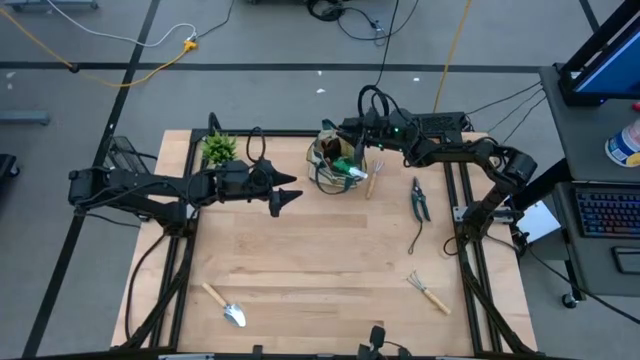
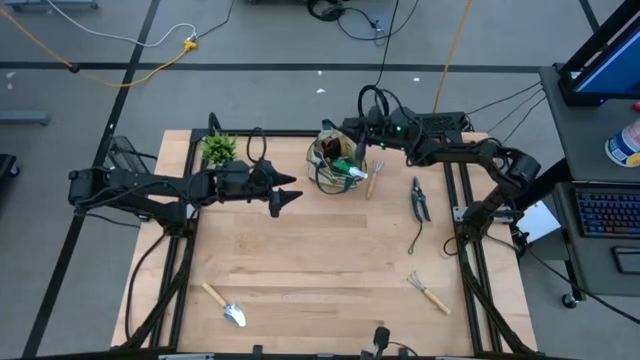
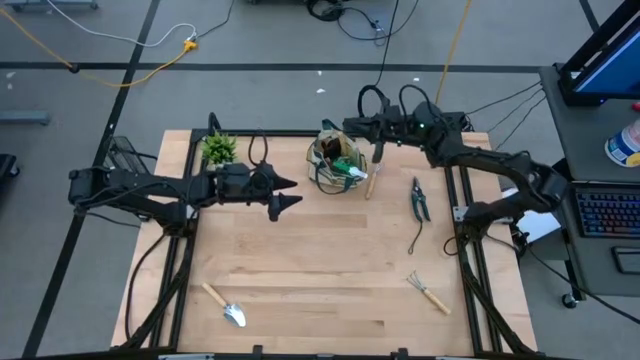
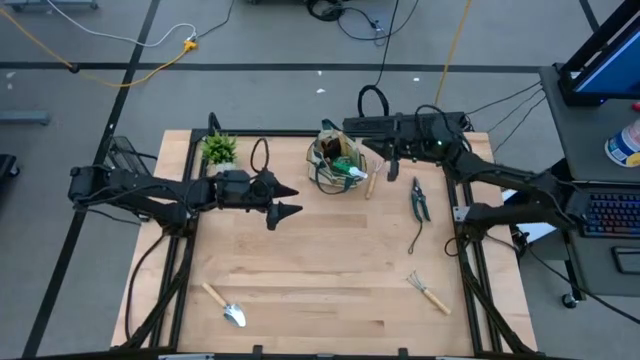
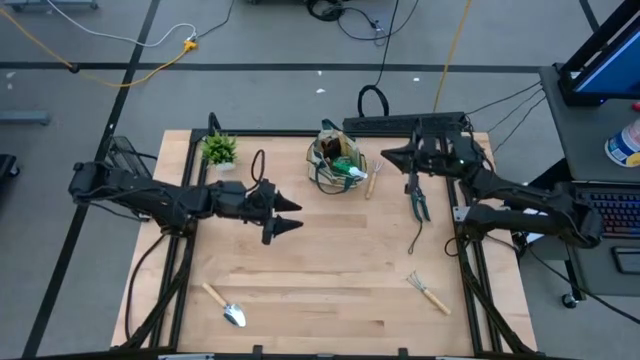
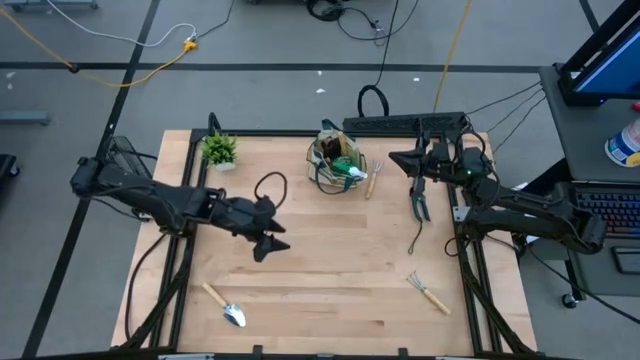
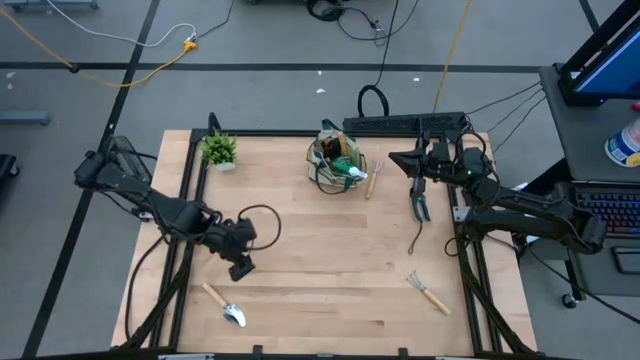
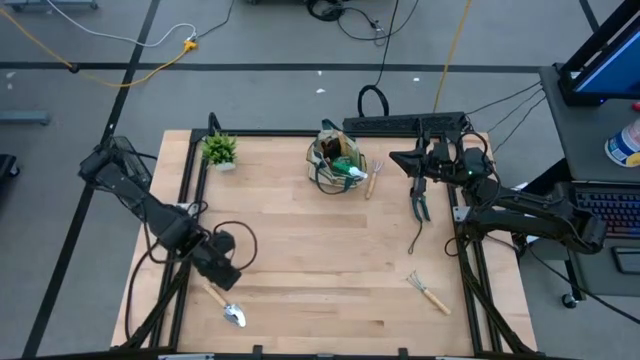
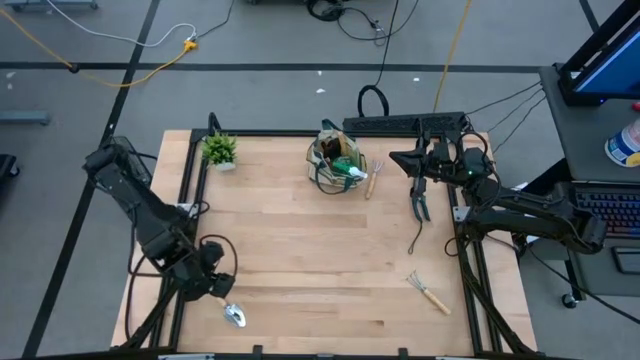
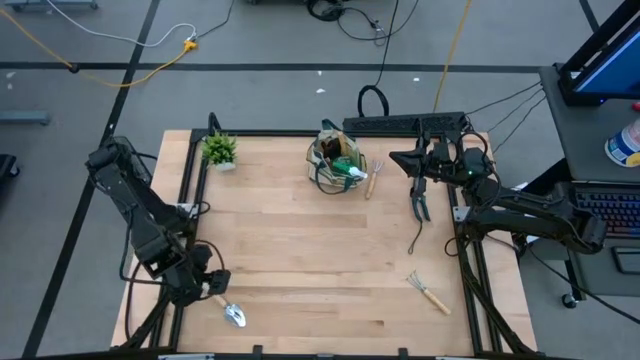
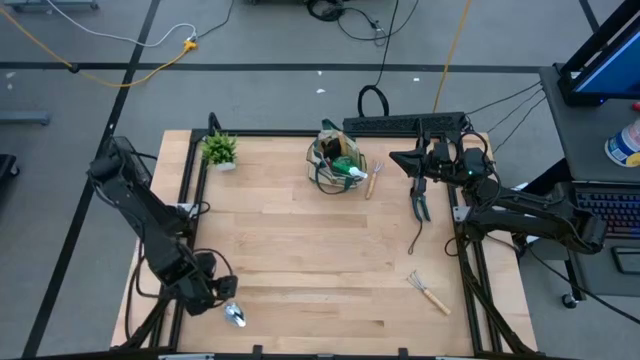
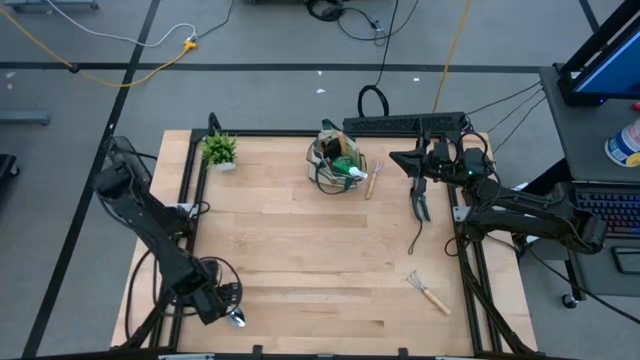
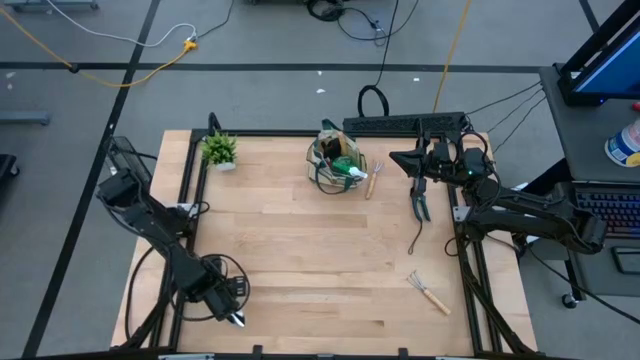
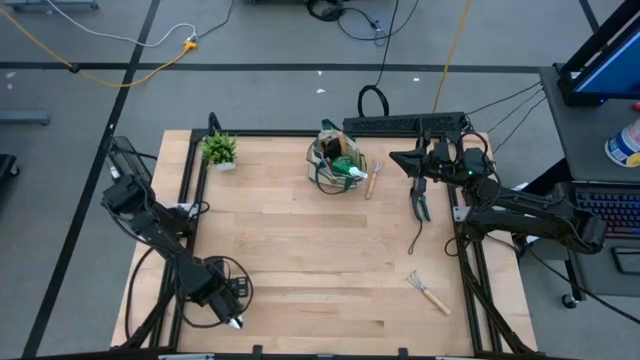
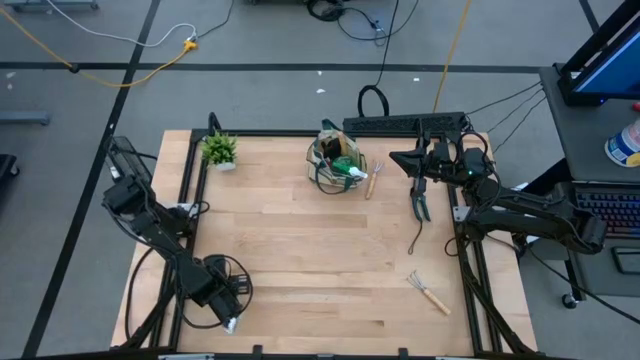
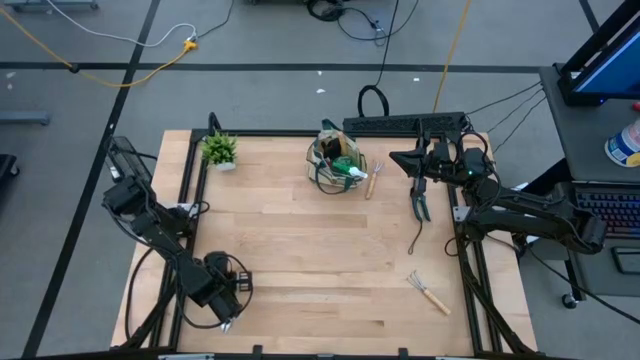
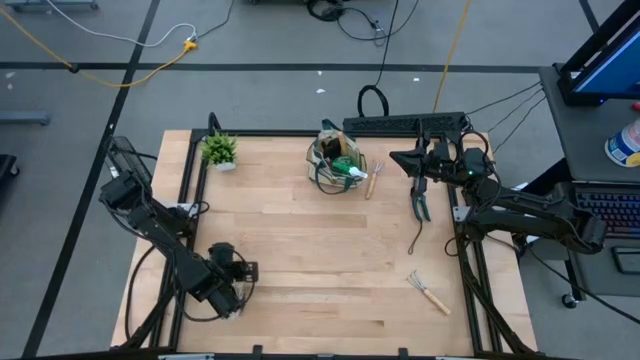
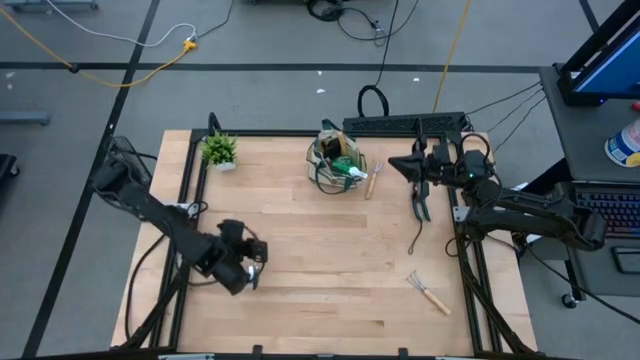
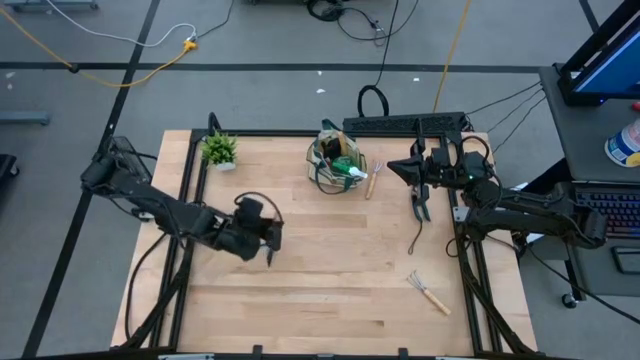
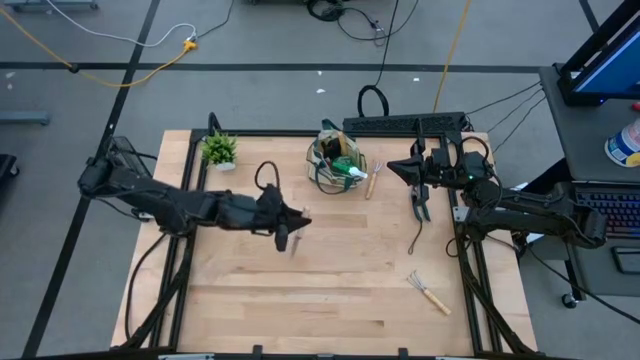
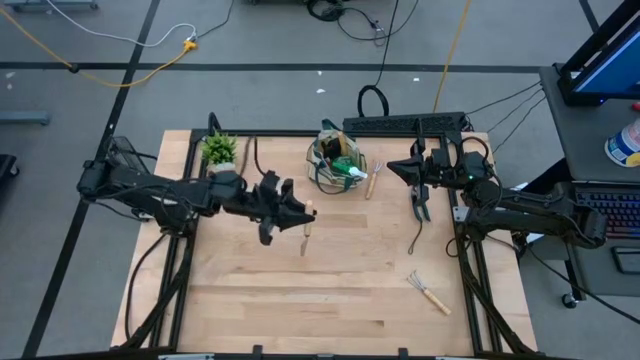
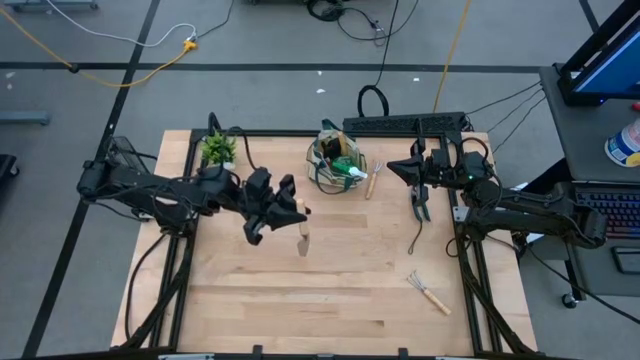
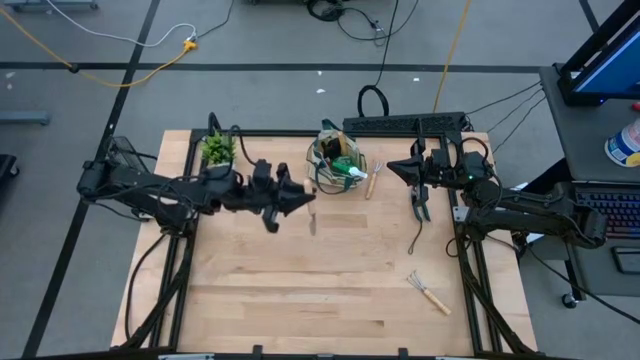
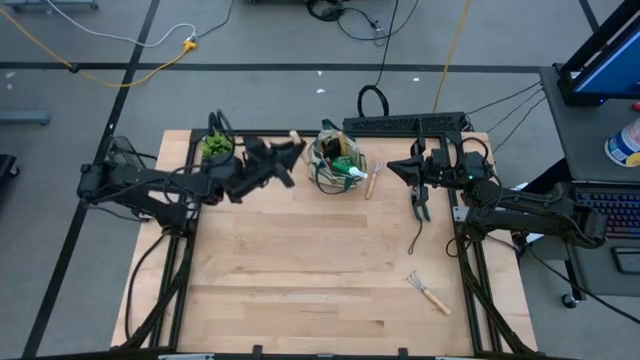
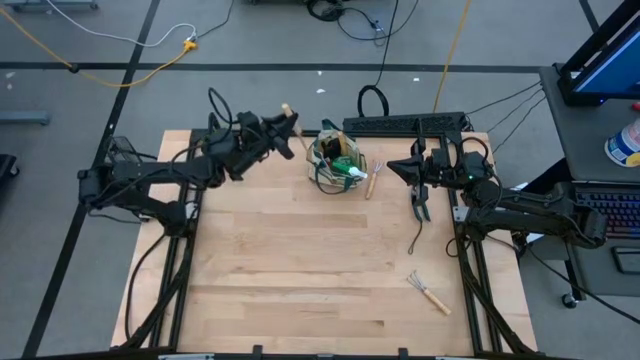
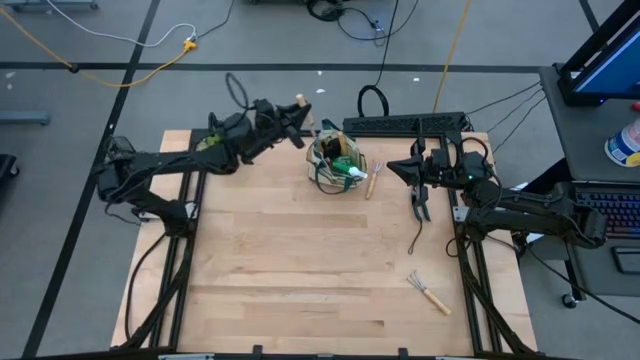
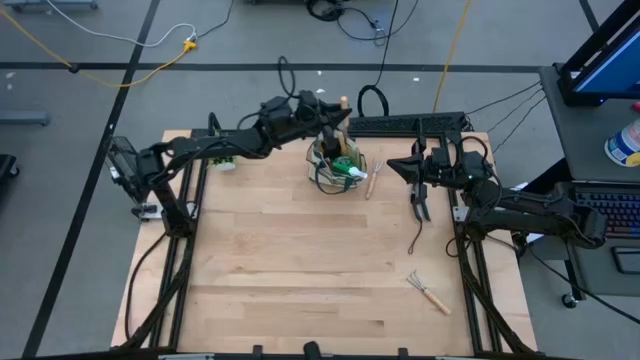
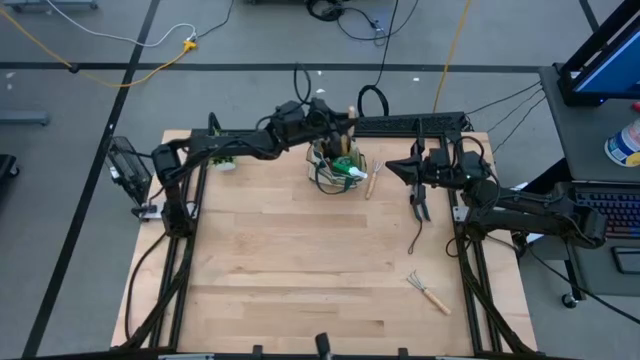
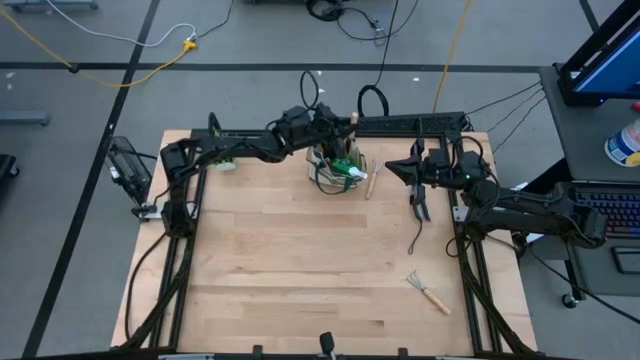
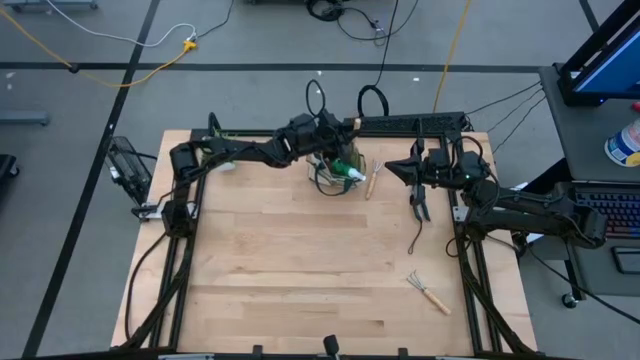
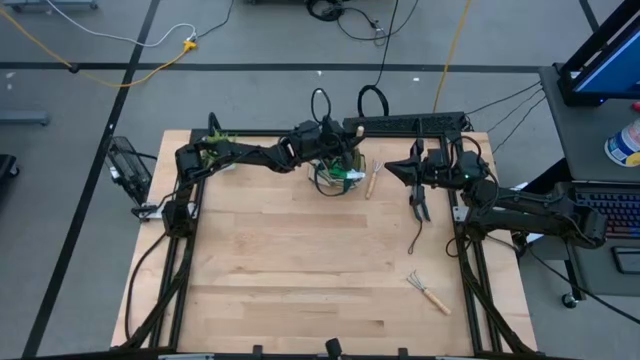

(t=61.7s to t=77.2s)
Task: Pick & Place Garden tools in Gardening bag
Put the brown trowel into the gardening bag

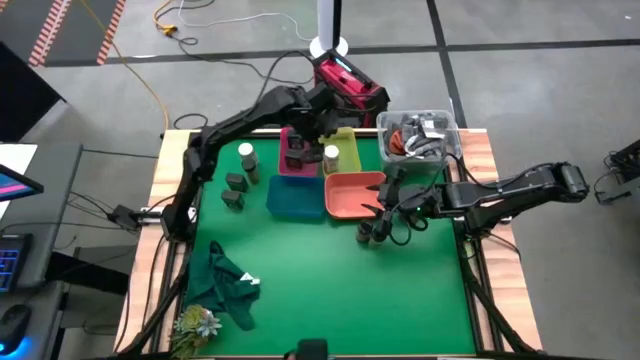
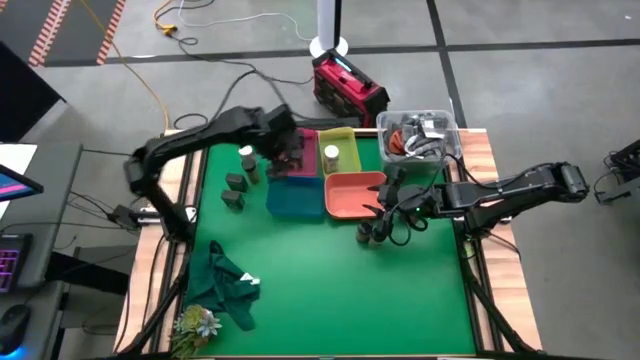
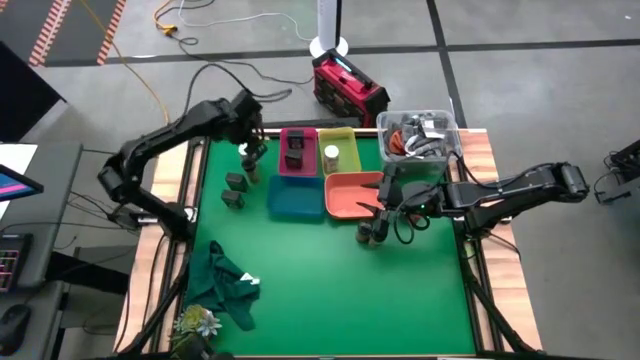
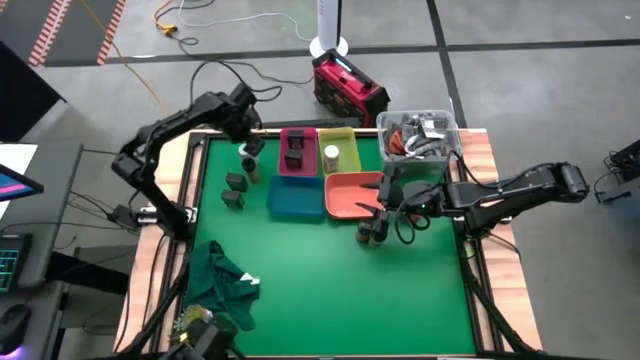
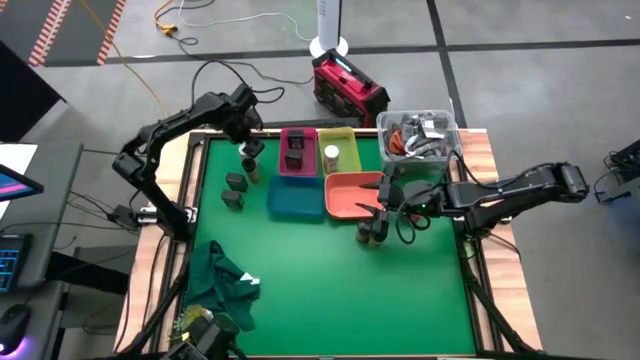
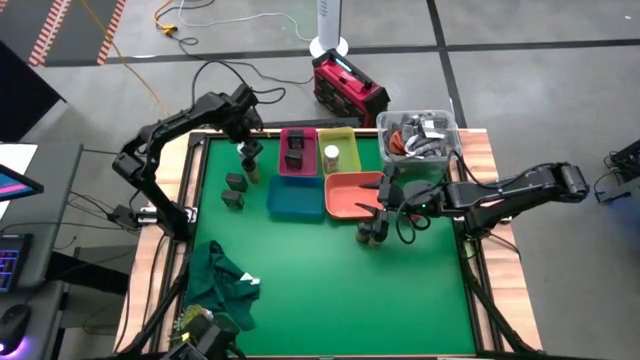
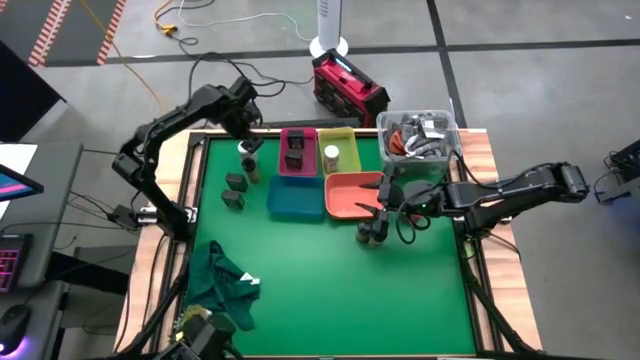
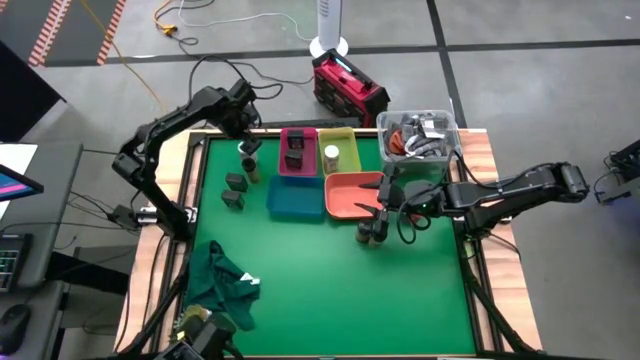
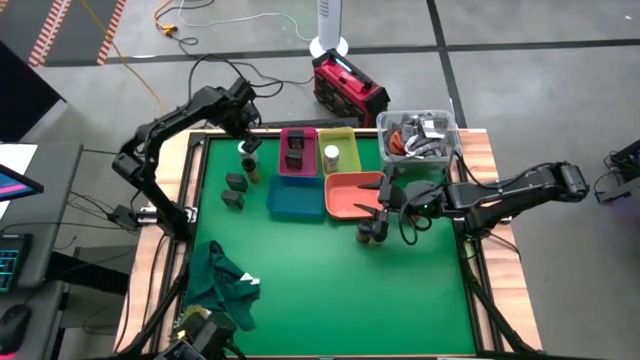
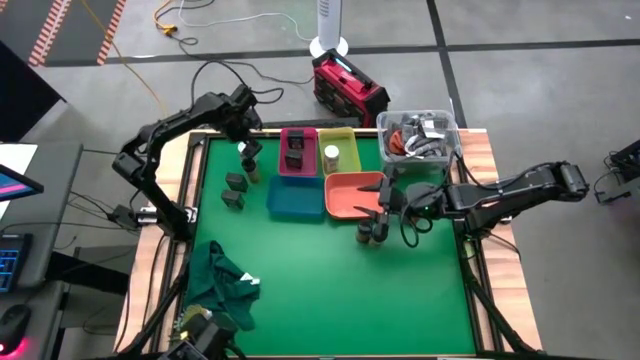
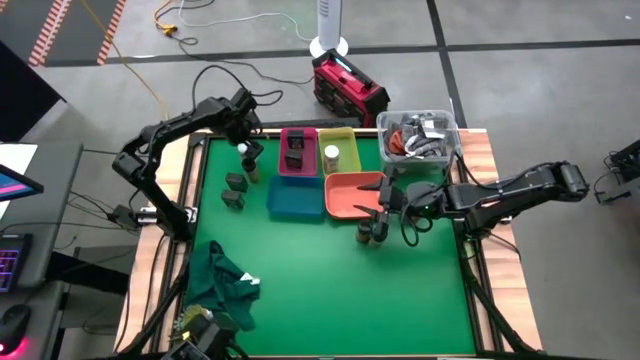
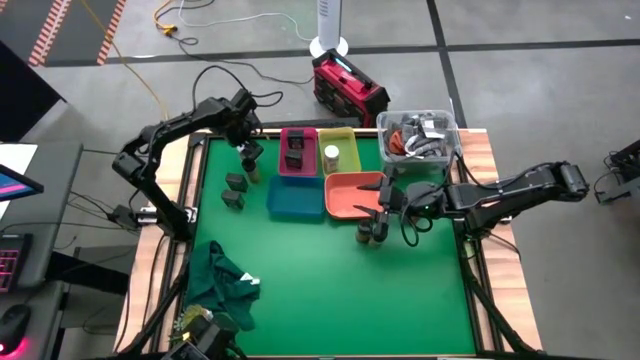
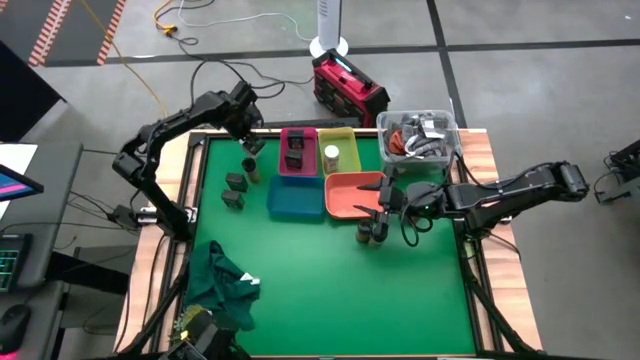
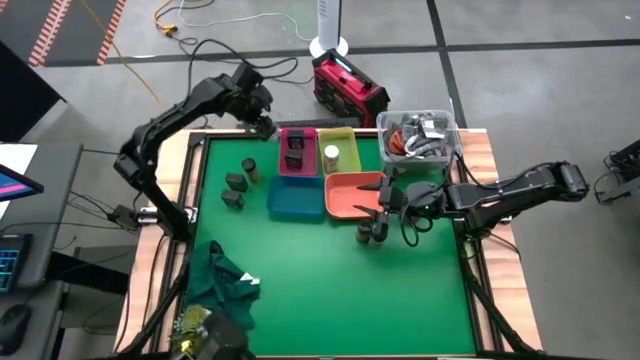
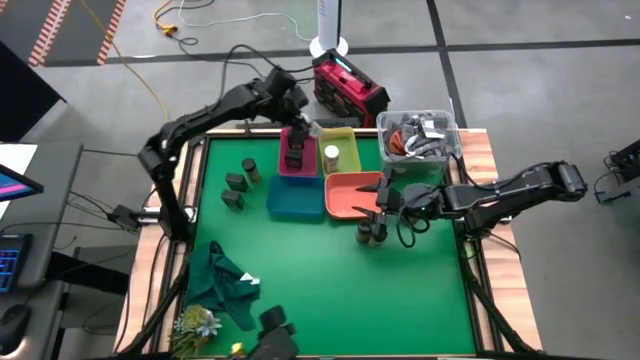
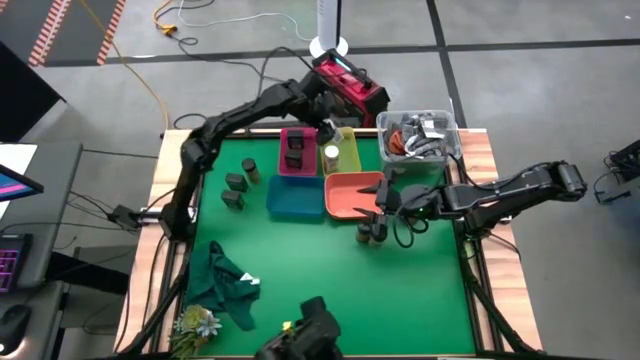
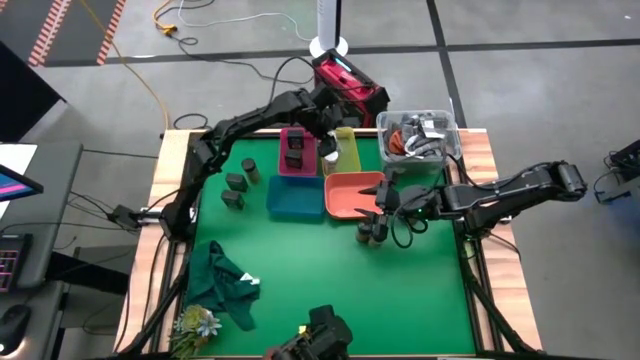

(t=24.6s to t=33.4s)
Task: Sort spices by type
Put the white seasoning bottle into the yellow bin
